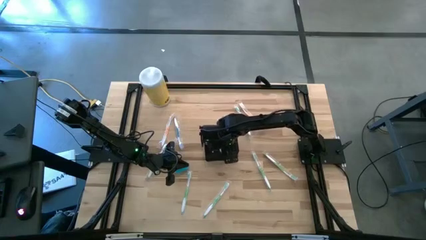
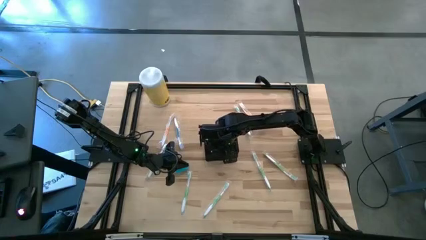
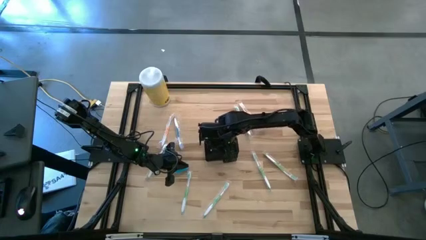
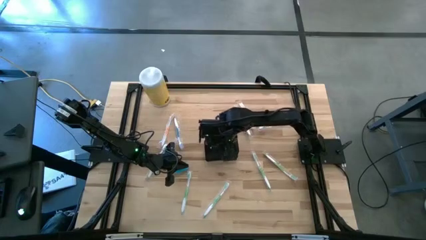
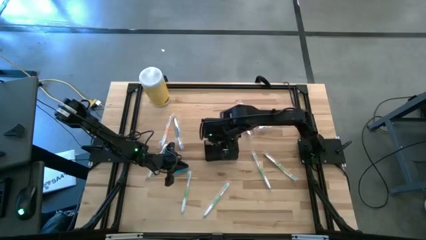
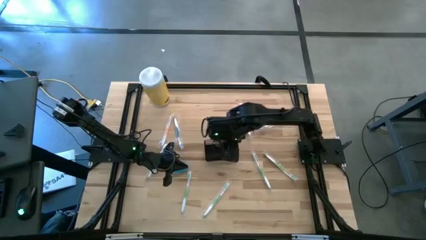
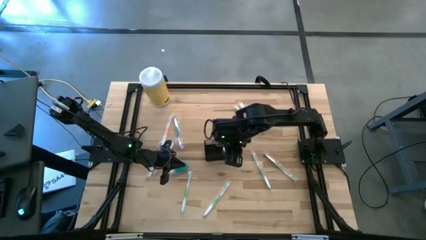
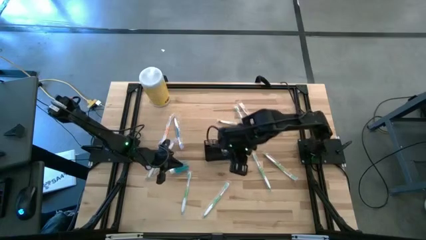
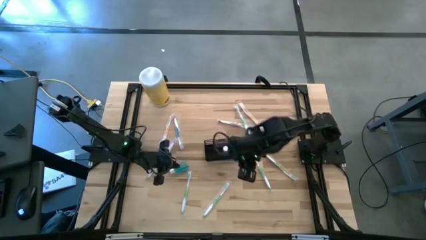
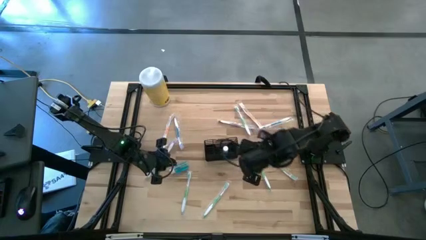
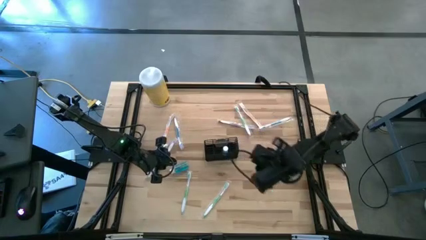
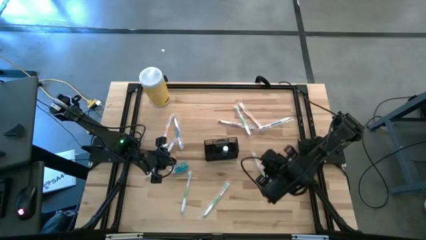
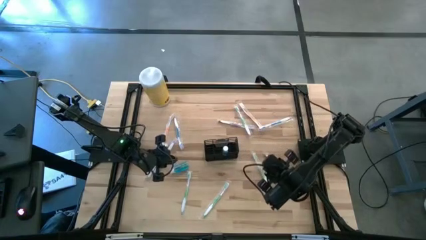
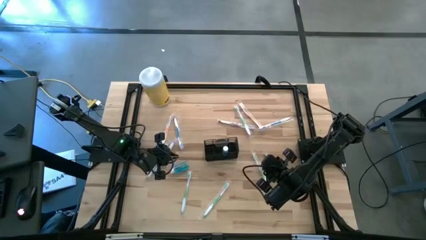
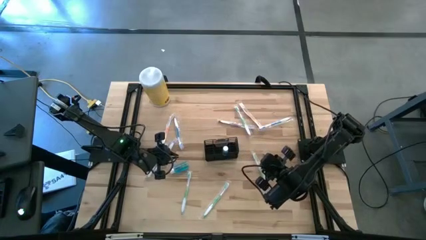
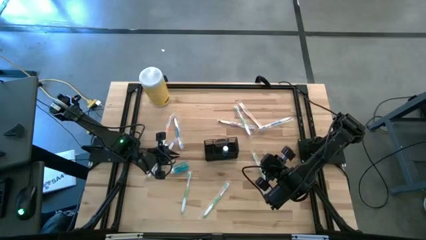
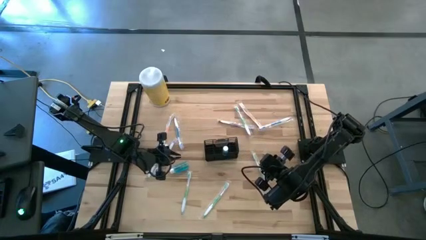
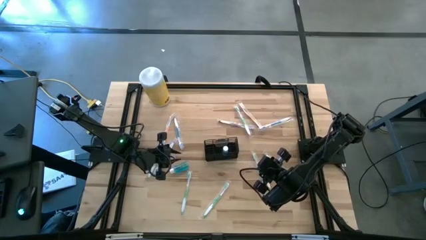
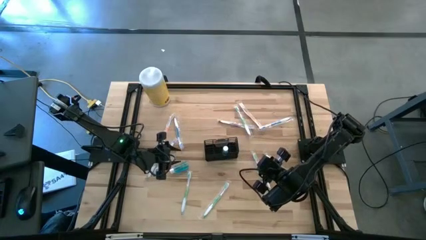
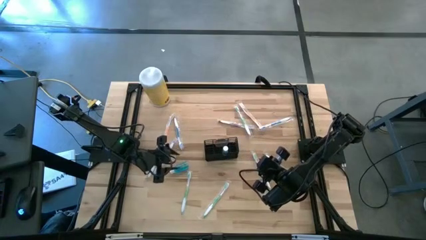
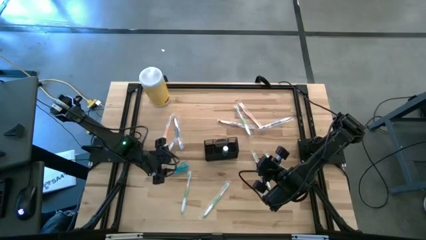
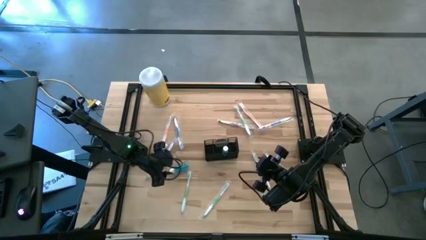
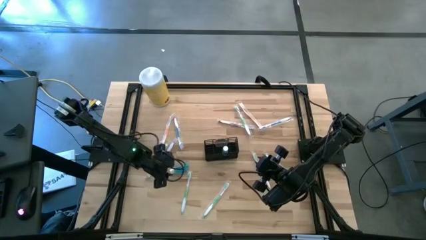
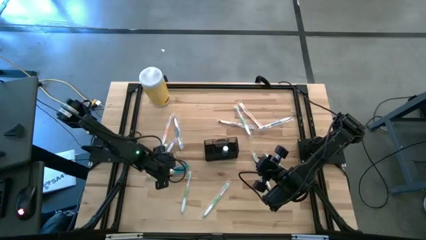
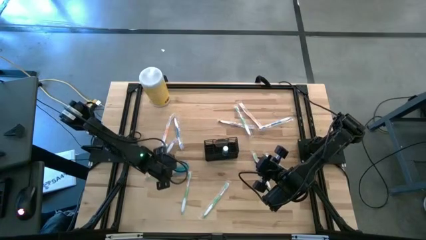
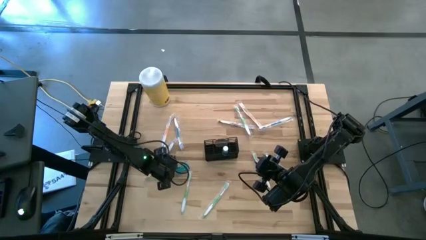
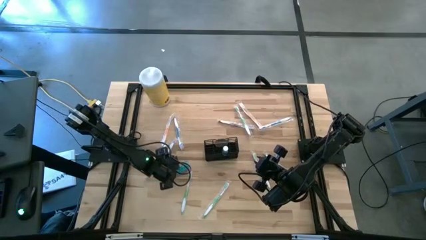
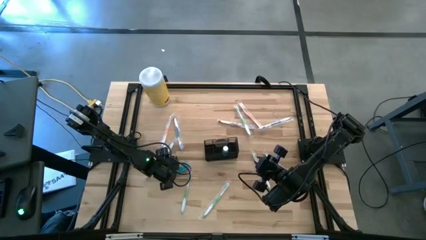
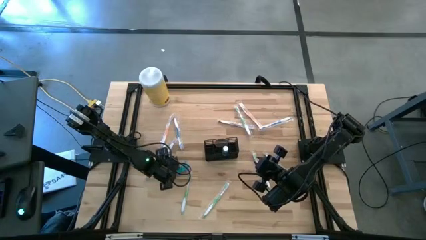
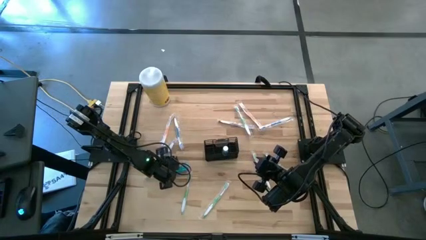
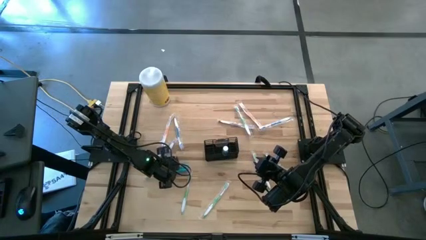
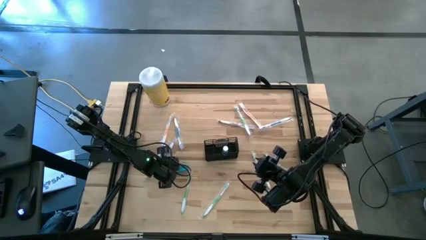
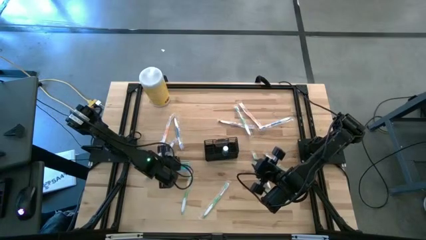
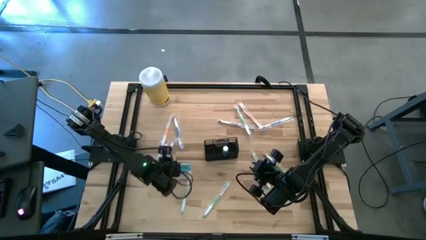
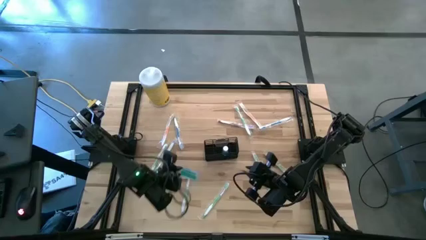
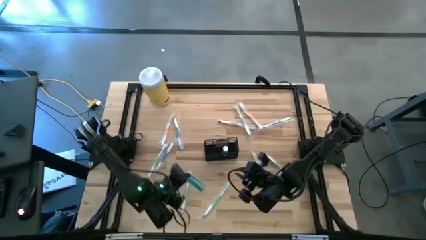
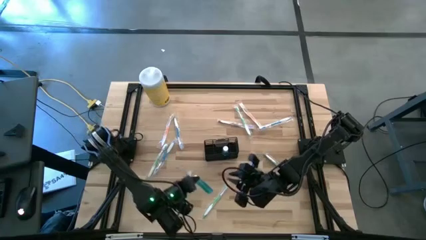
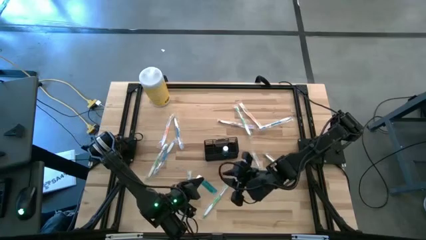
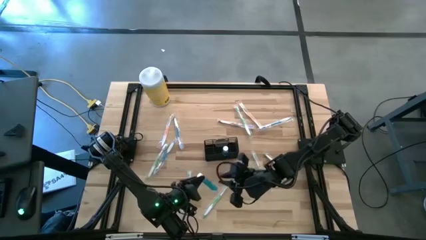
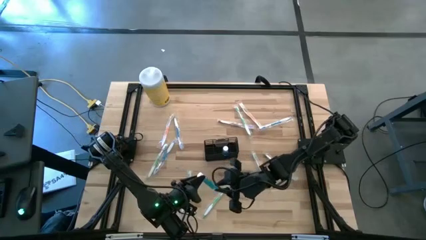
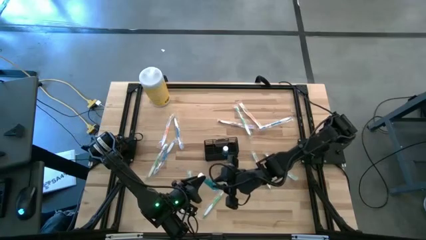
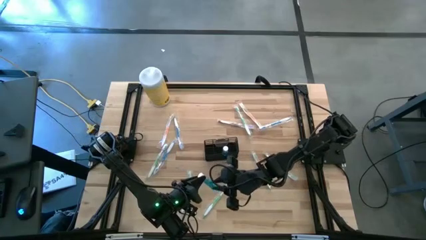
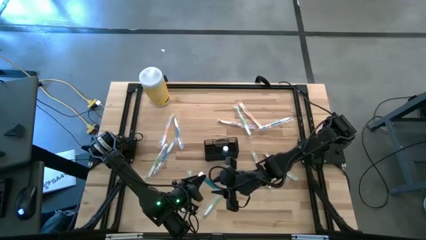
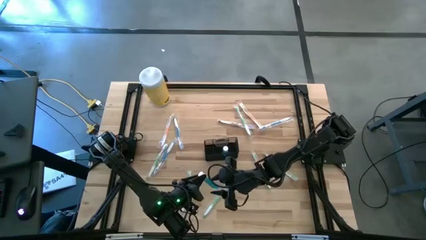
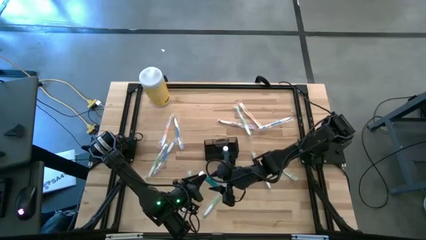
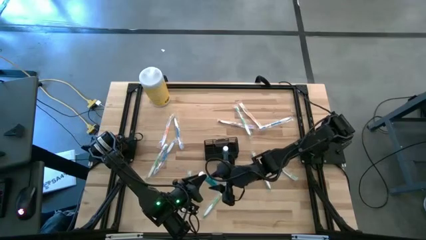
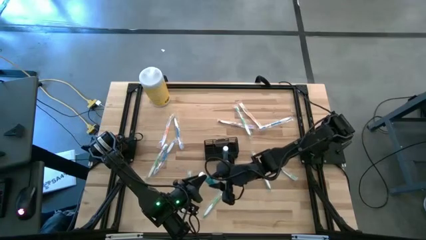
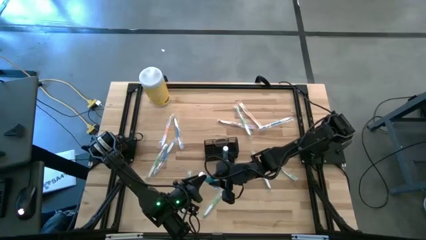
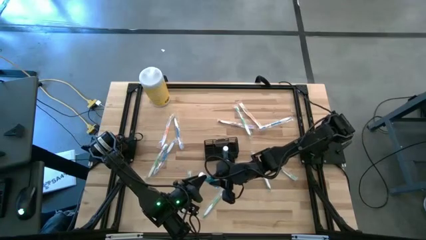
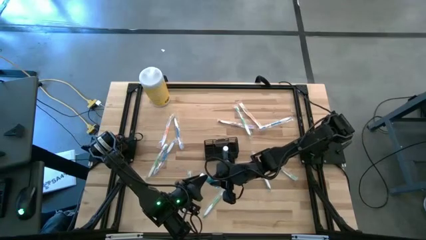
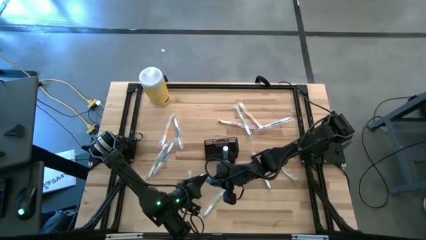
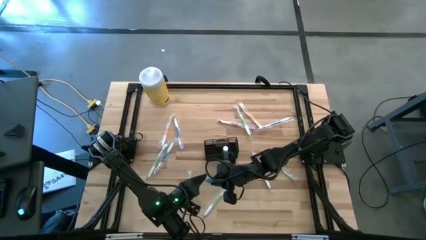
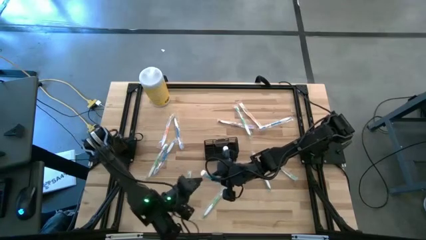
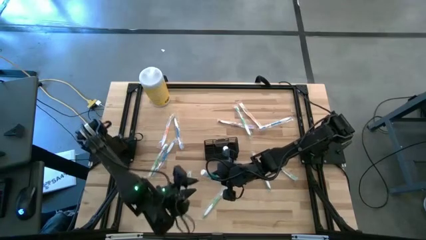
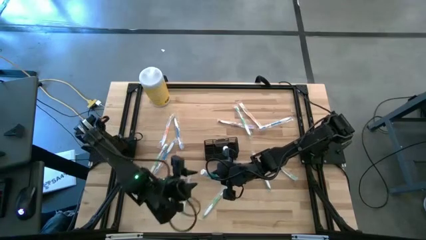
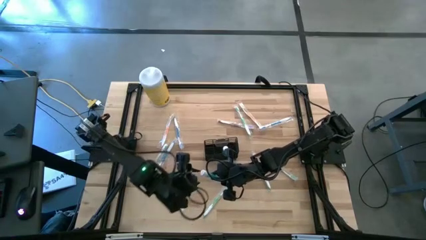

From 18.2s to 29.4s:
Task: Pick & Place toothbrushing station
Put the blue mouthwash into the wire organizer
